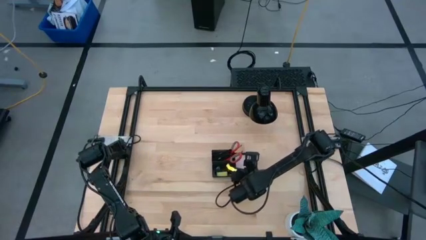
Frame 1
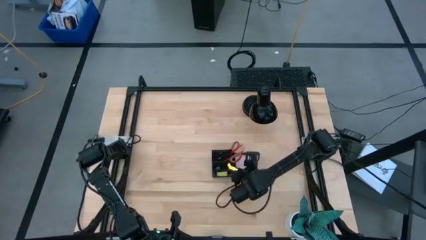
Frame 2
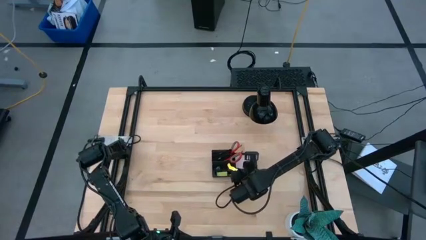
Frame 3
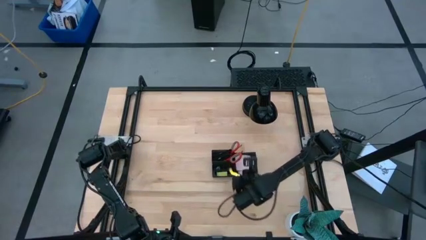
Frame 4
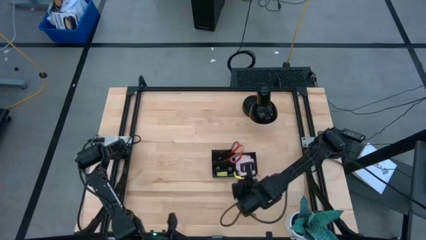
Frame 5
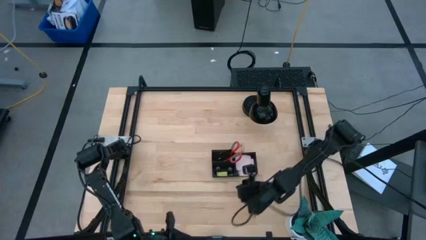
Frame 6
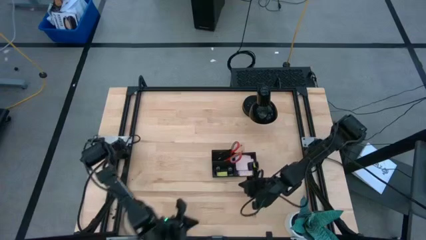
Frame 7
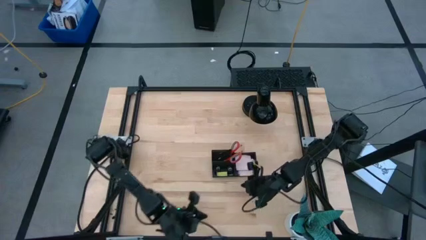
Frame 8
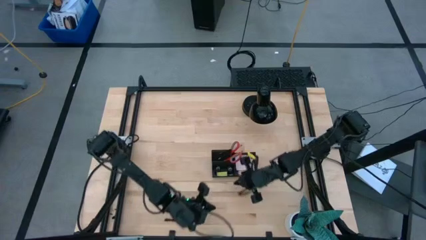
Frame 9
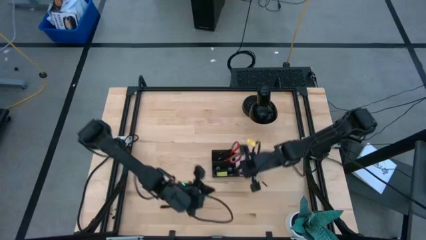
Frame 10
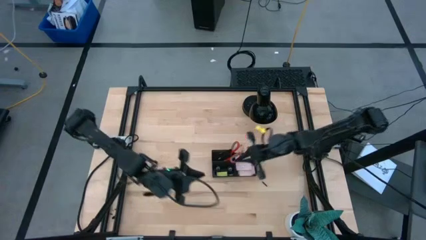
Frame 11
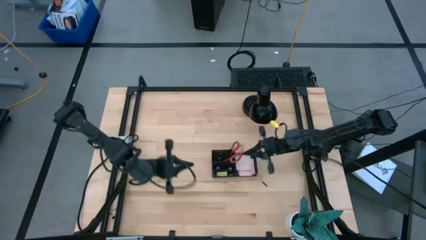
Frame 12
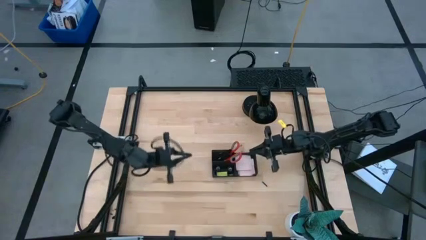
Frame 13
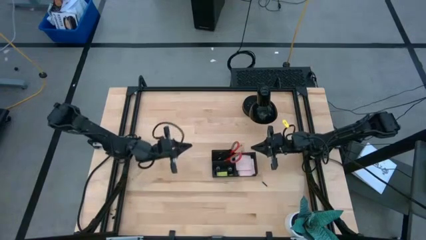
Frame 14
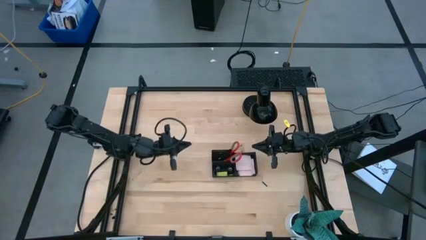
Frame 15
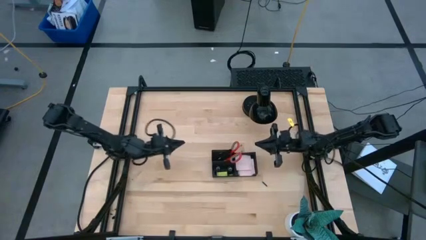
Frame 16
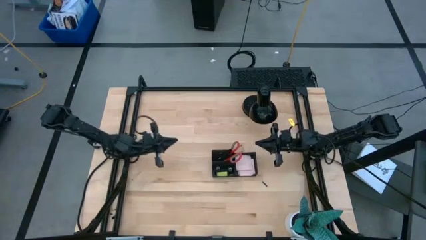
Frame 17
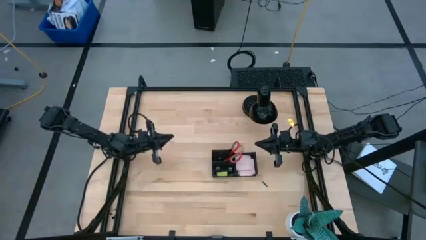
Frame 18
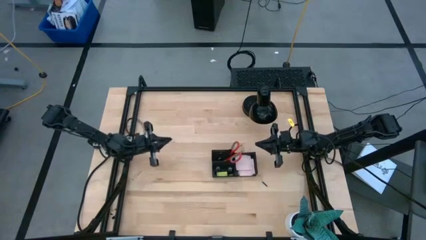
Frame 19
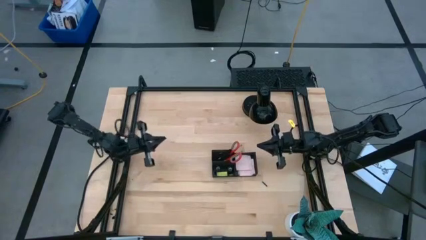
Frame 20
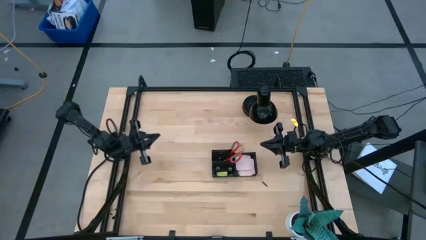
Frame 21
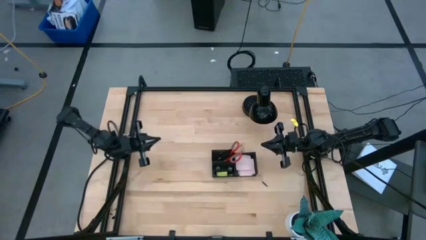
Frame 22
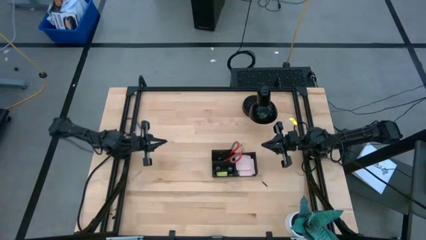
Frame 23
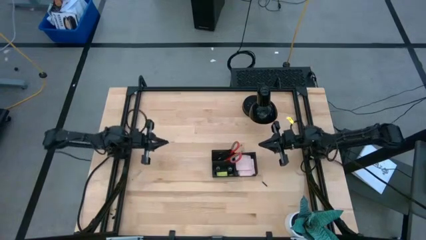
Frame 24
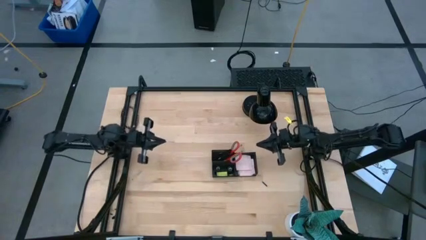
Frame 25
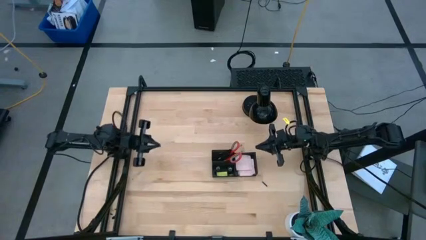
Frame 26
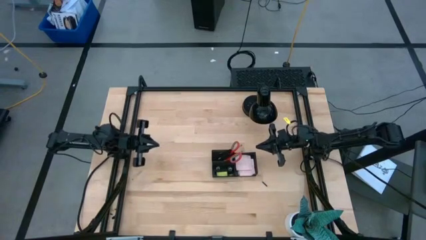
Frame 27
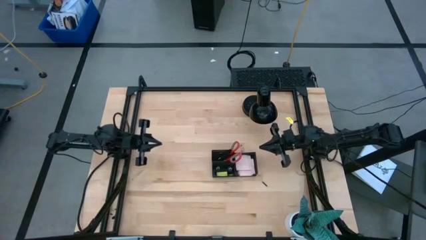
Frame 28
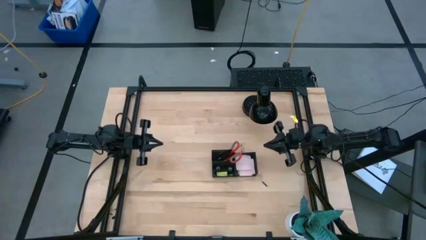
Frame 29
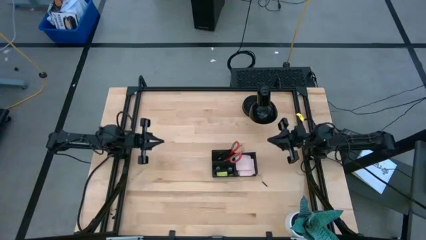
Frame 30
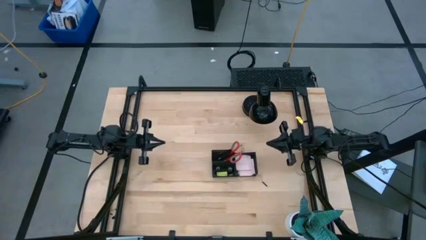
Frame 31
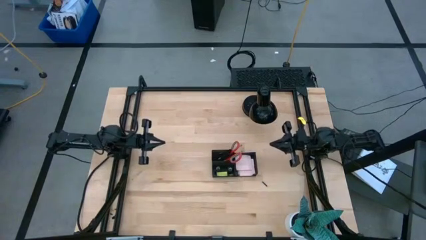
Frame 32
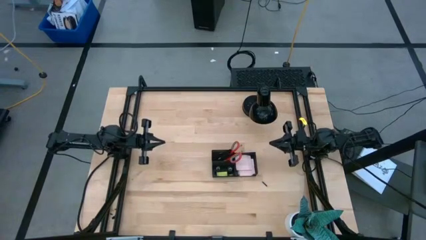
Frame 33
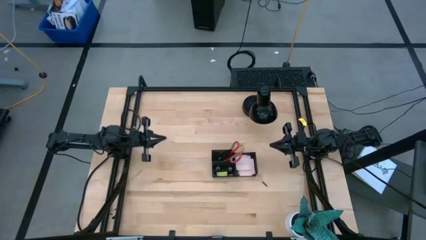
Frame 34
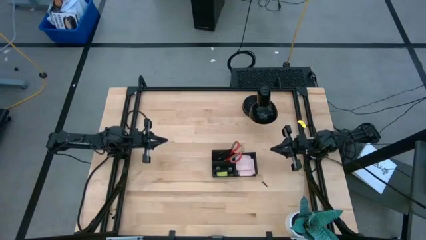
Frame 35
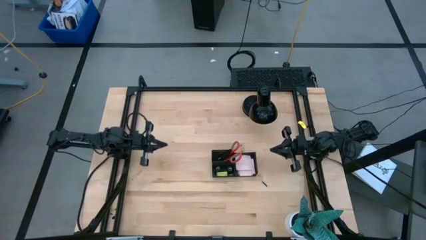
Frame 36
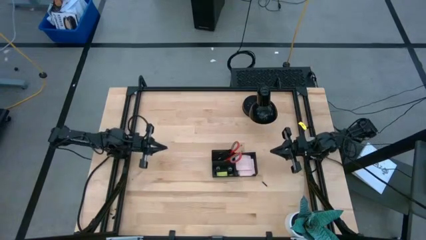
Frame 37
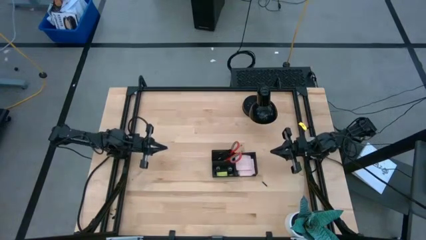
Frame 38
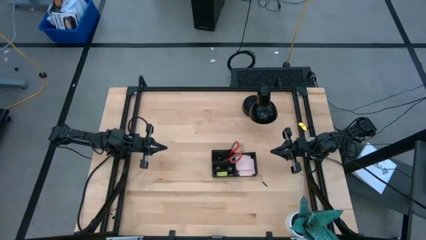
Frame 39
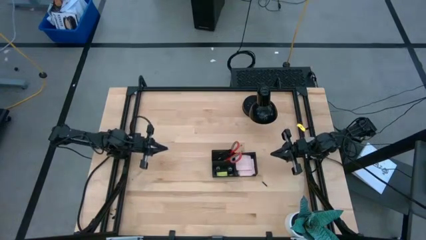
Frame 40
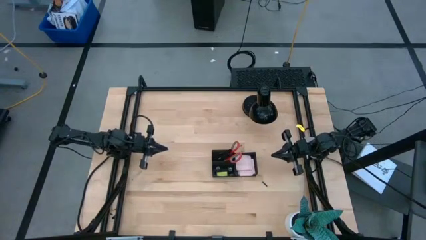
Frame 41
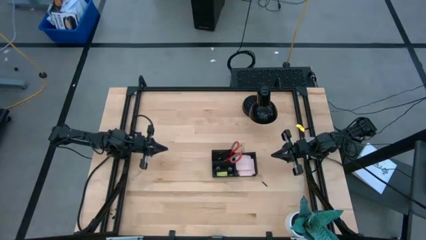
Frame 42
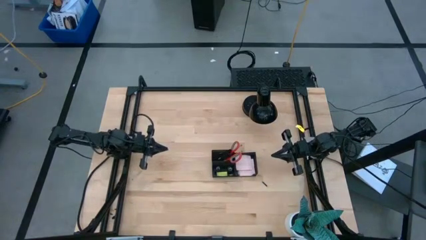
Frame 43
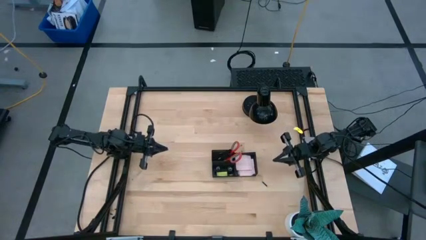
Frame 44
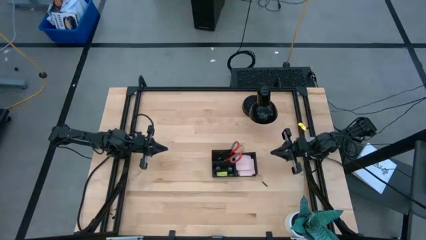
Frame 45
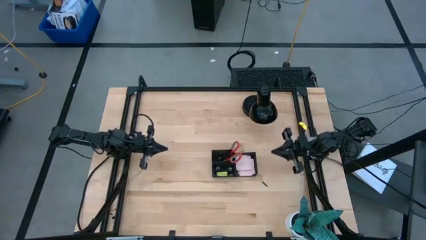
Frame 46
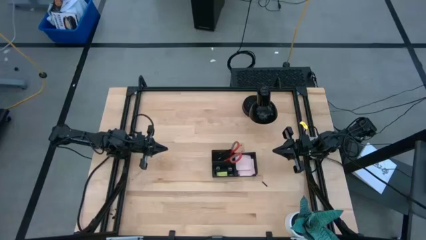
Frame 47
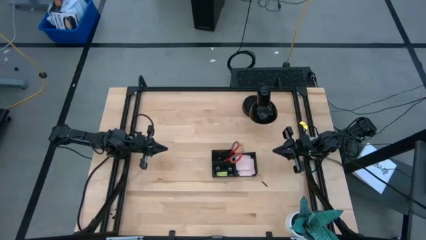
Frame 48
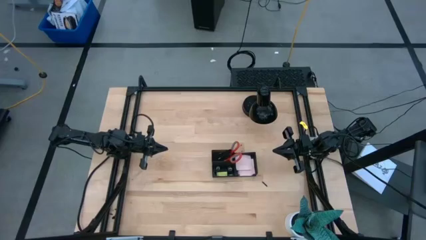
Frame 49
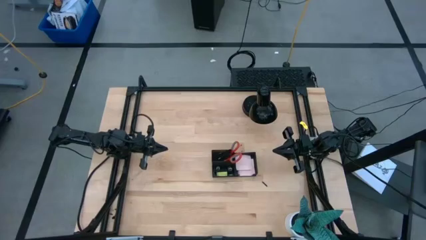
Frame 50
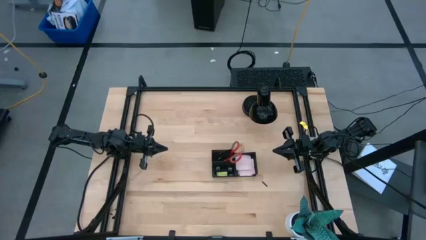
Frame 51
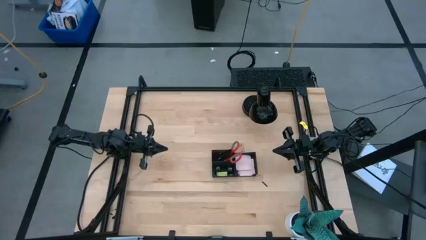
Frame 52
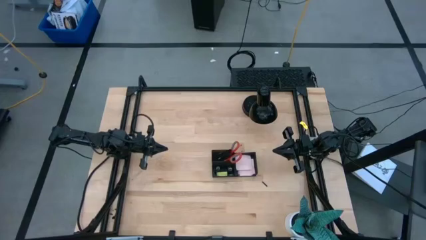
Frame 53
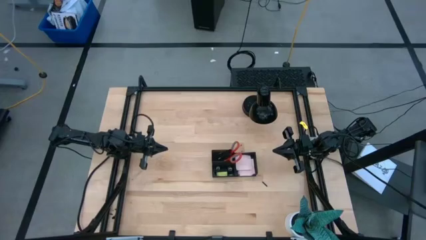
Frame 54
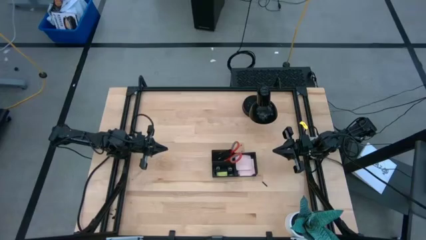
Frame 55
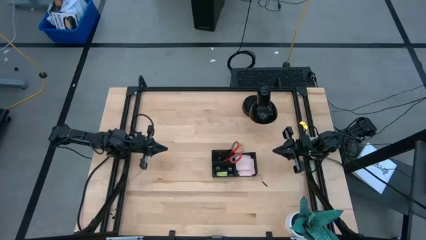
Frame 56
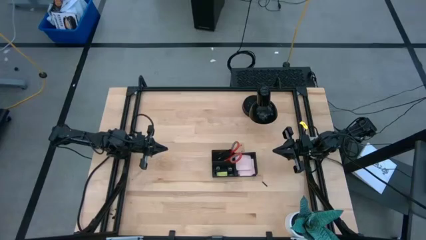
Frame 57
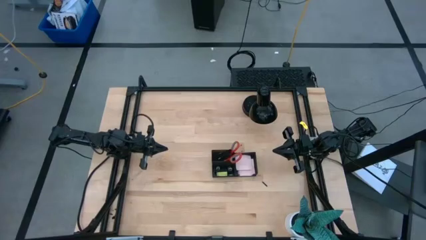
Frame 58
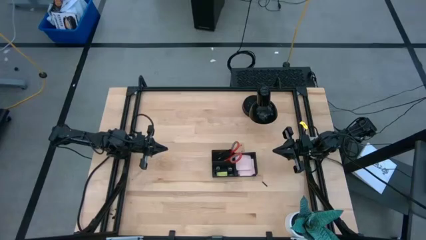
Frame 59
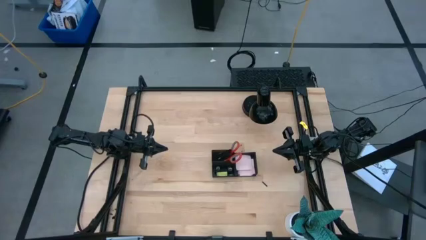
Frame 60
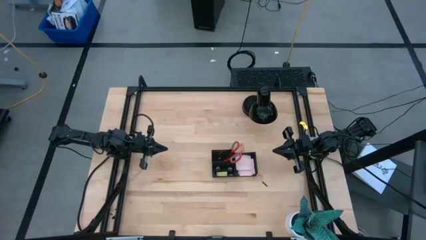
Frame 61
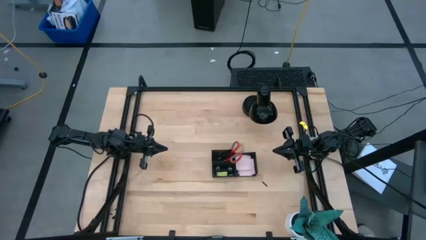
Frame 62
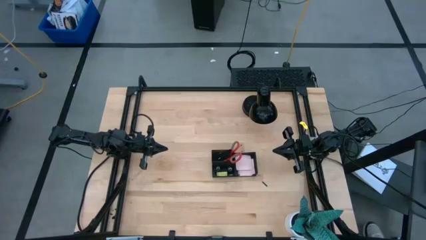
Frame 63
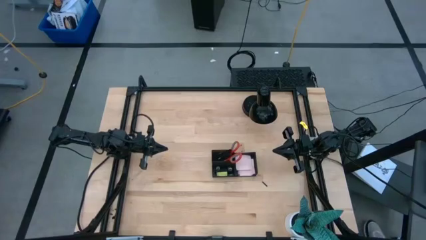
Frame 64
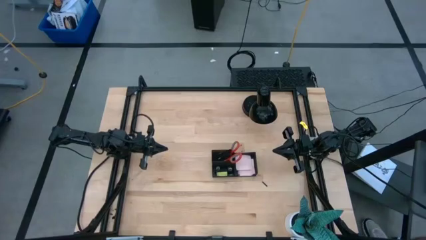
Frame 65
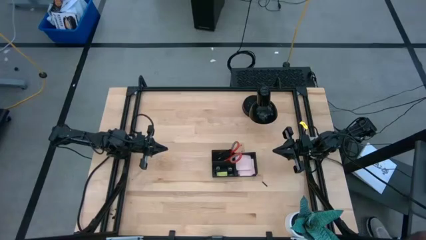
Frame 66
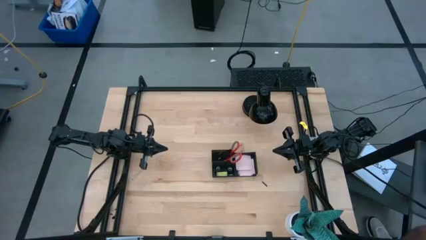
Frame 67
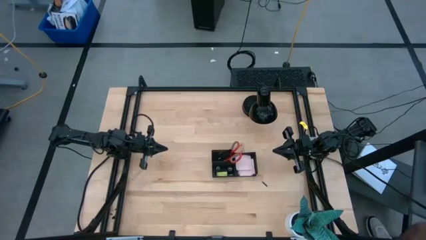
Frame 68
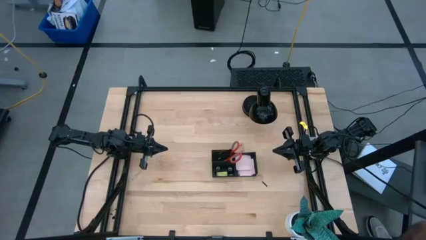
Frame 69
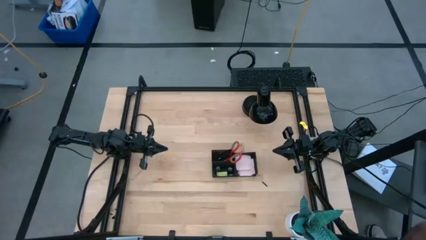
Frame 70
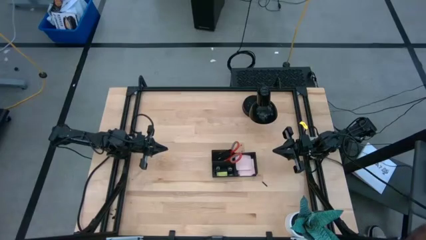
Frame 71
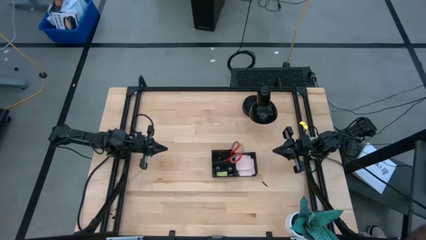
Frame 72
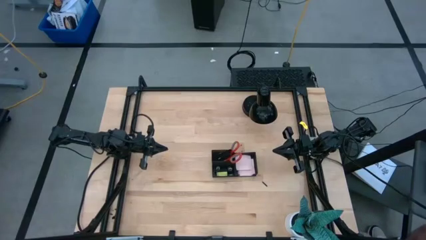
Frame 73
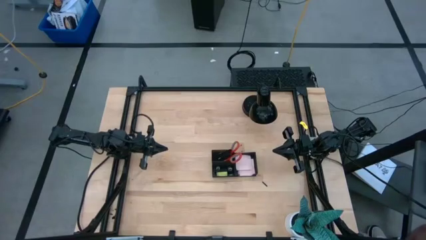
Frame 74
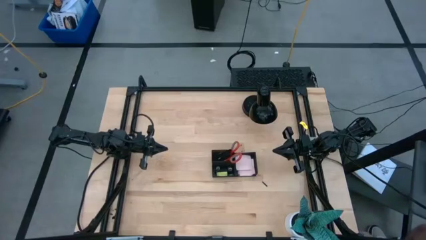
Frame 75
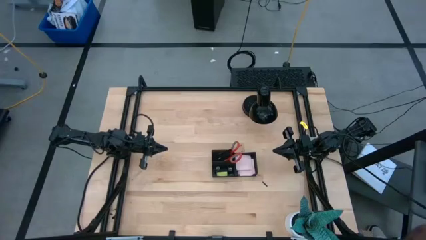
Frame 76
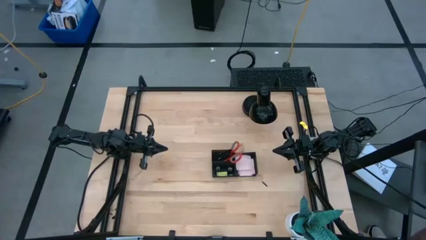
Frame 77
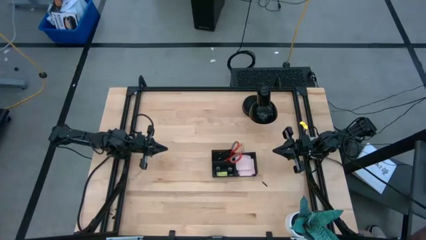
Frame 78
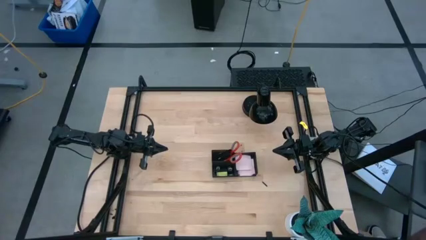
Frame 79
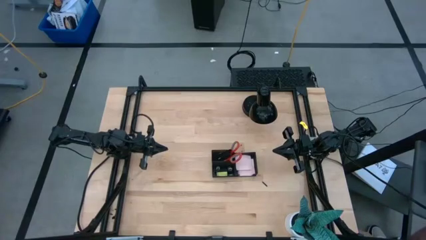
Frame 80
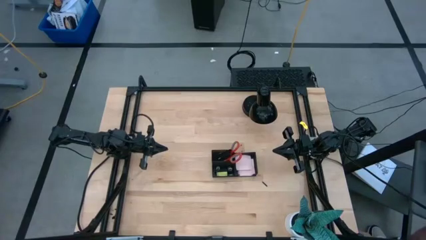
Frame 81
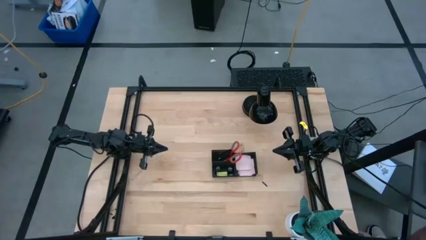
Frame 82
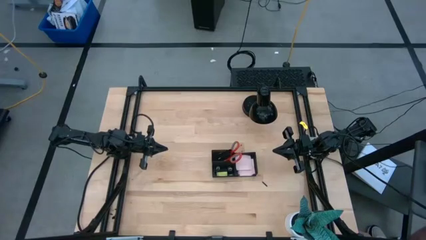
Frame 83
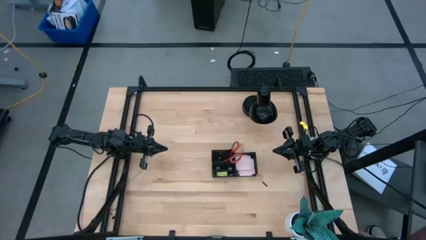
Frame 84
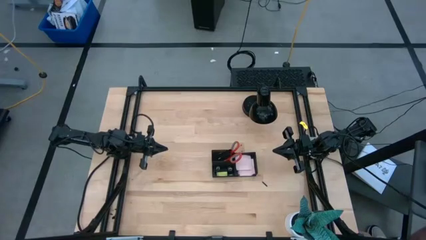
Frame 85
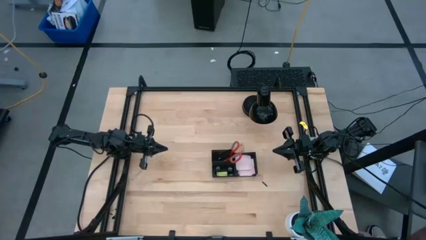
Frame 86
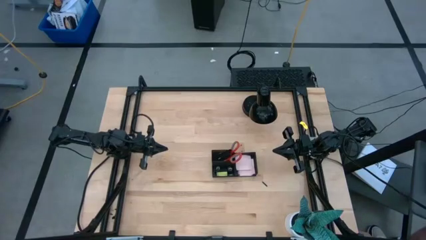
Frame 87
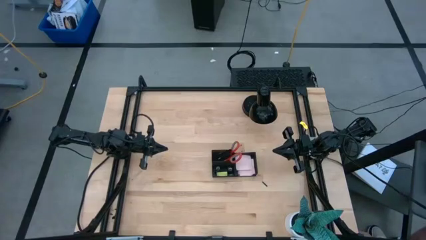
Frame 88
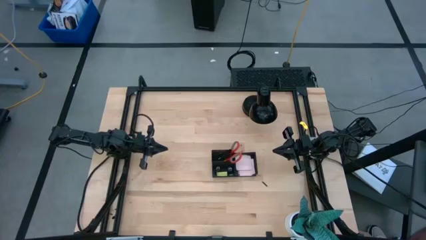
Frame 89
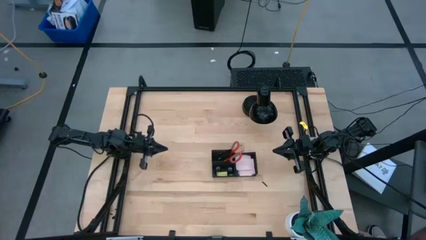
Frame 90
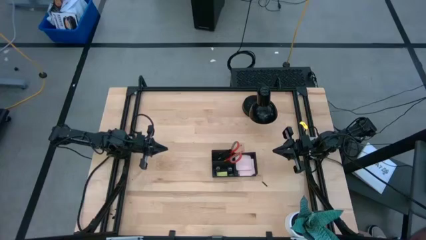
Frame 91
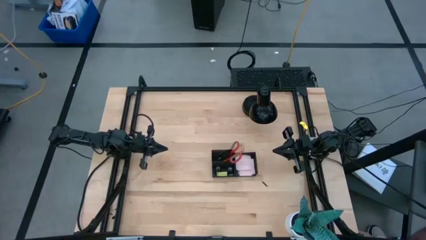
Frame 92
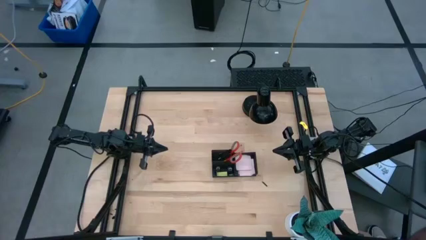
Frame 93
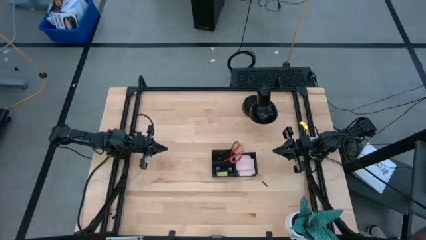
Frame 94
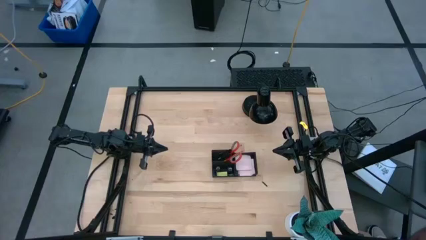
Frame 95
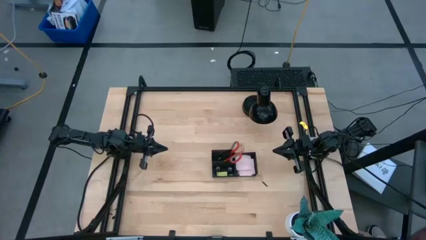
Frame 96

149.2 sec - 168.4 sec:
Task: Pick and place office supplies into organizer
Return to Home Position
